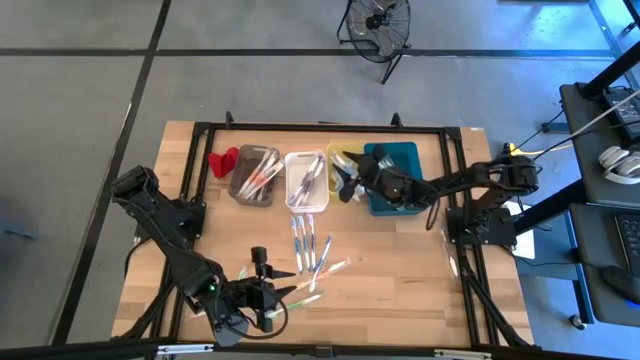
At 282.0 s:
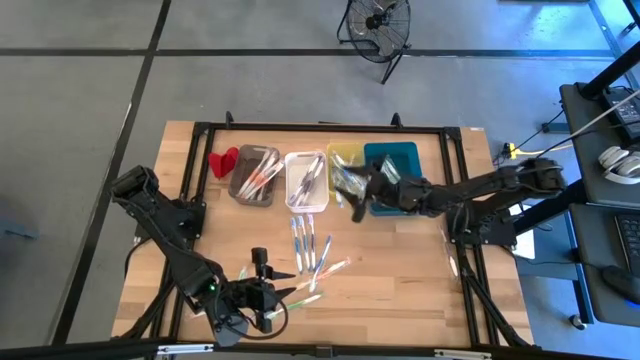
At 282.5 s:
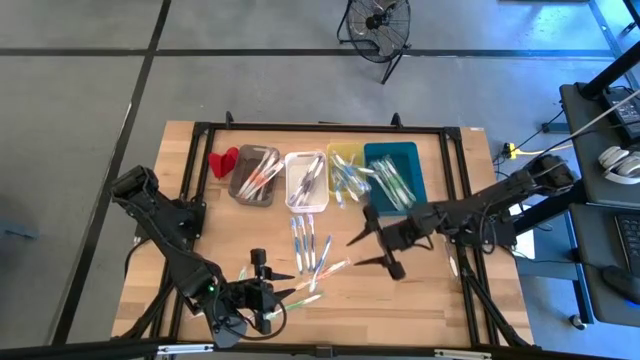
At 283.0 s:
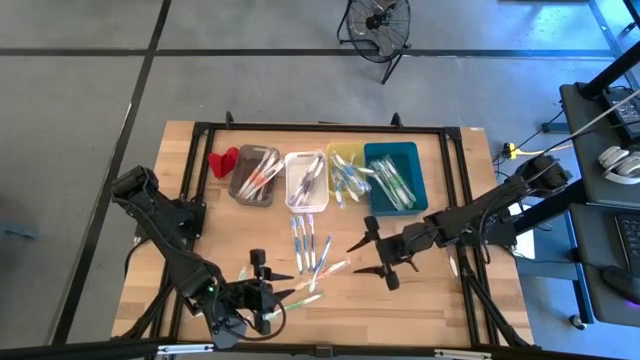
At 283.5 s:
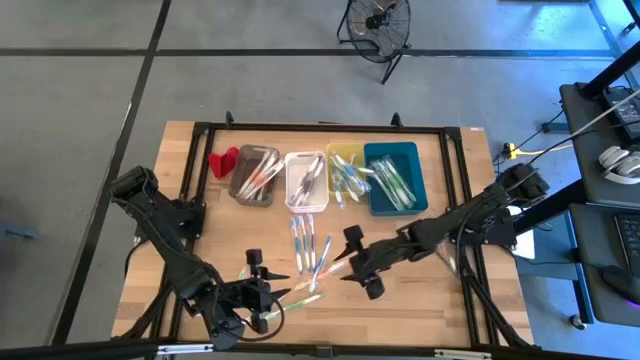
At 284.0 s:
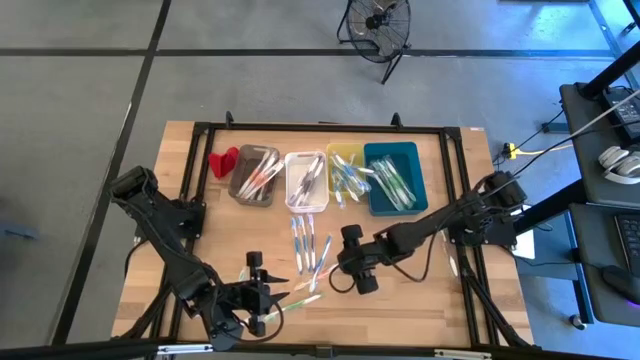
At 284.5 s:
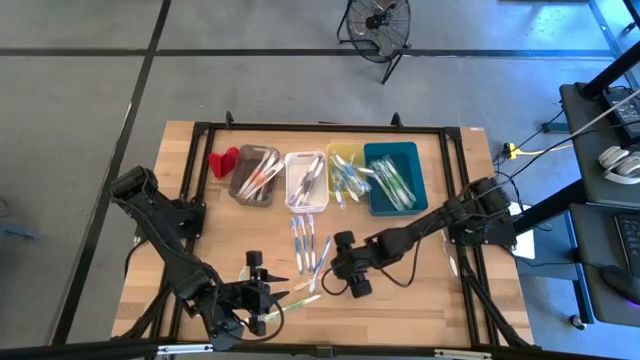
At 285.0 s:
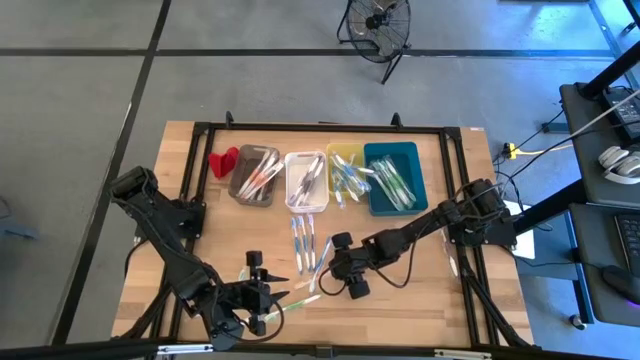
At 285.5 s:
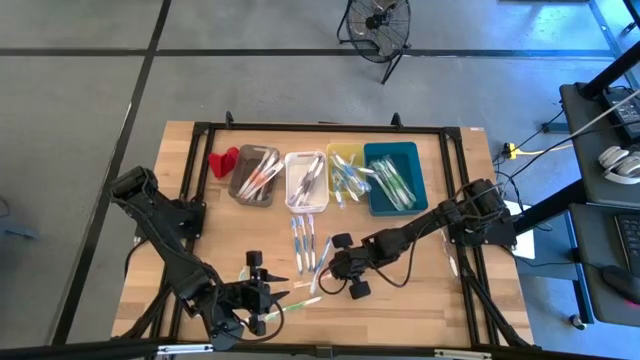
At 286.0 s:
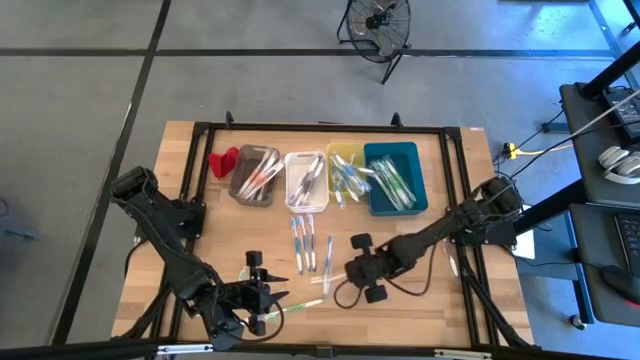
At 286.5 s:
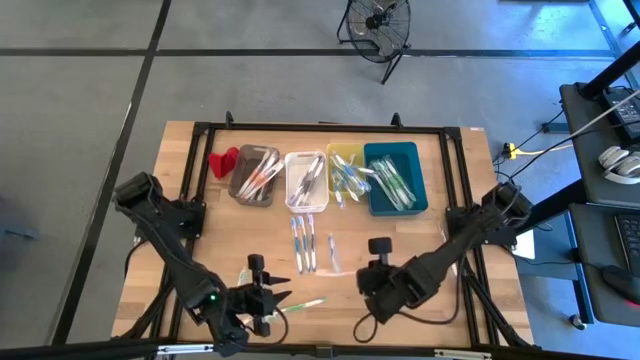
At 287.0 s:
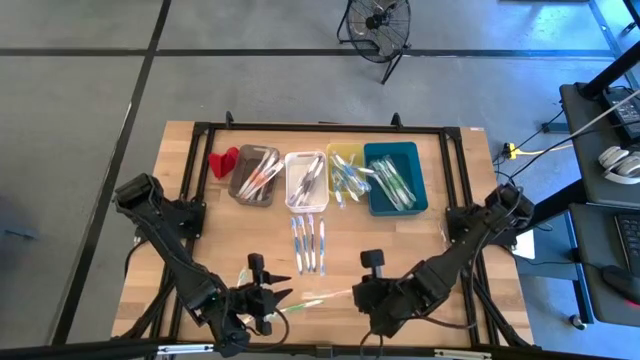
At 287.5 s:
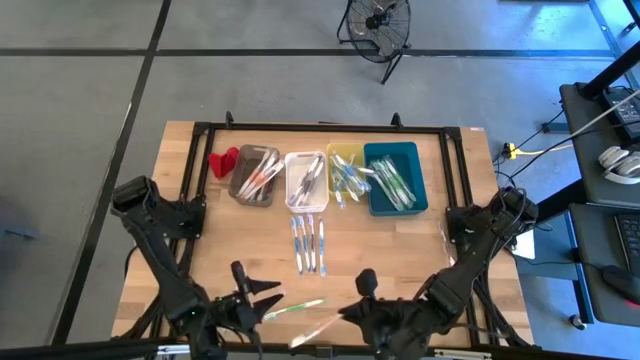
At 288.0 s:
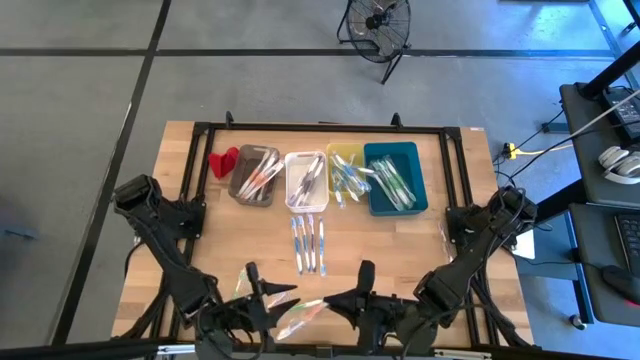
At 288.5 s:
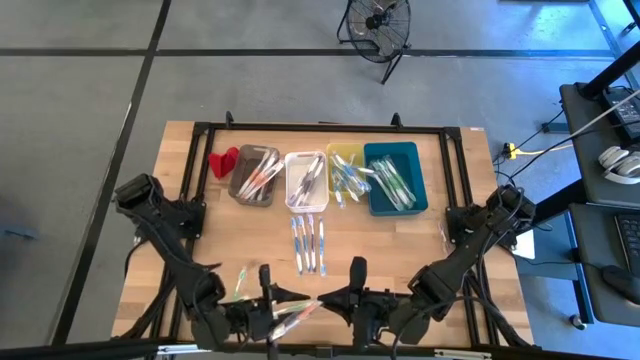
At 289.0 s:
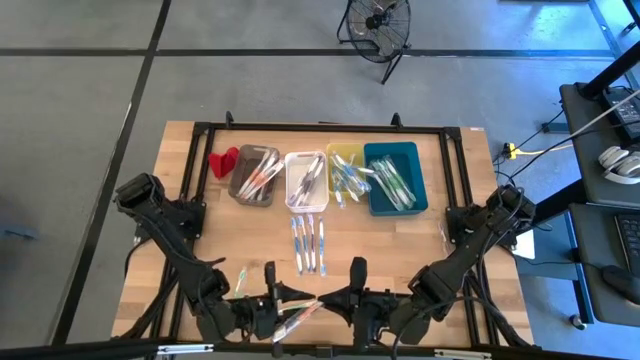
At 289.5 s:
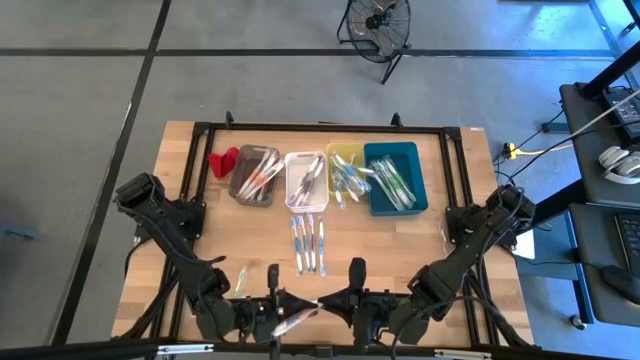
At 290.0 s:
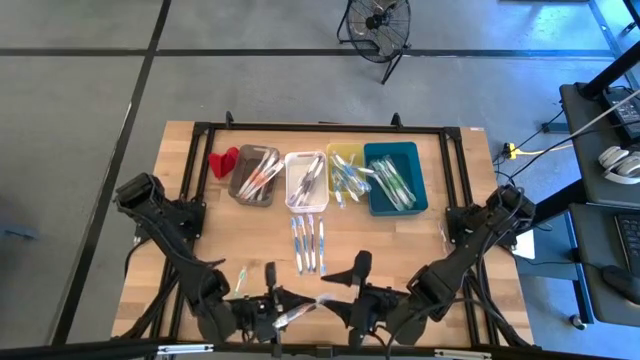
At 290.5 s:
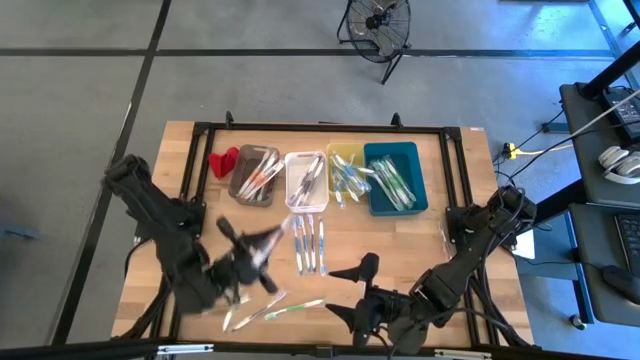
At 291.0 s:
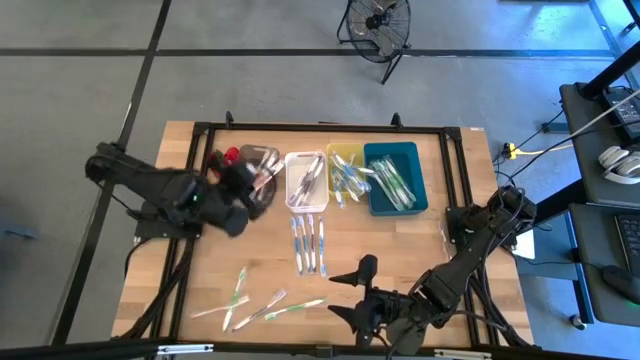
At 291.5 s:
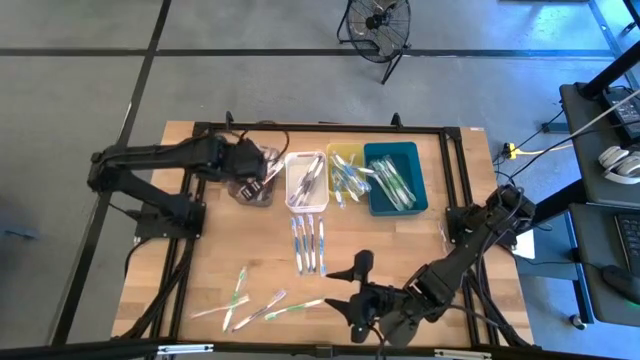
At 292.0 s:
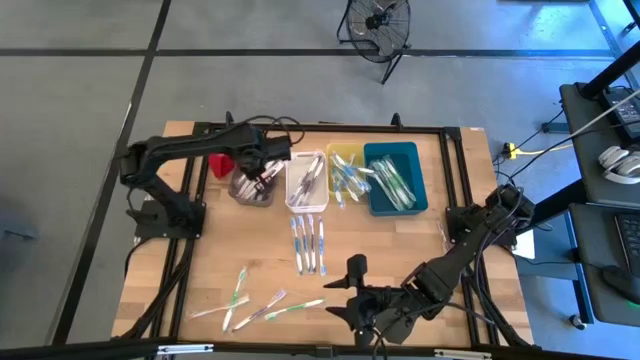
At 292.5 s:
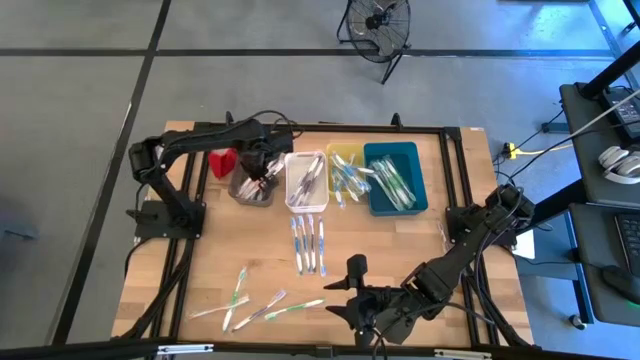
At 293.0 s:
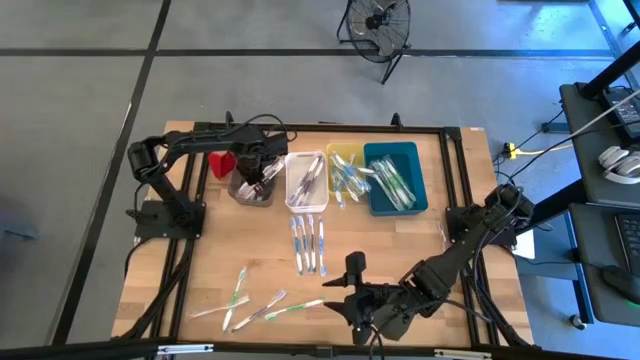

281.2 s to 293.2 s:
Task: Pick & Place Toothbrushes
Put the right orange toothbrush into the black bin

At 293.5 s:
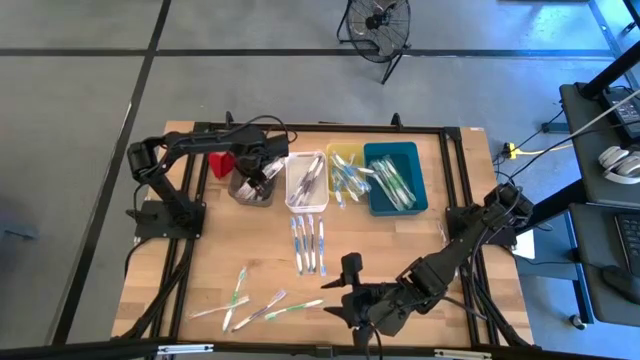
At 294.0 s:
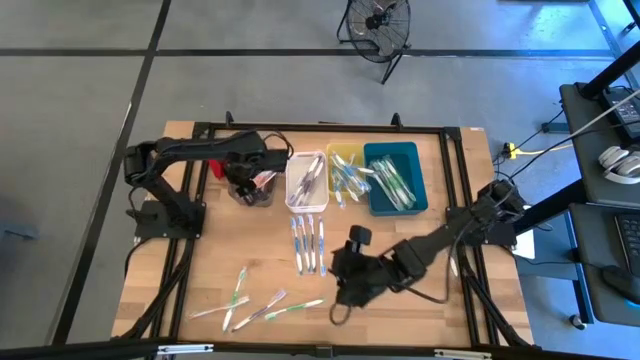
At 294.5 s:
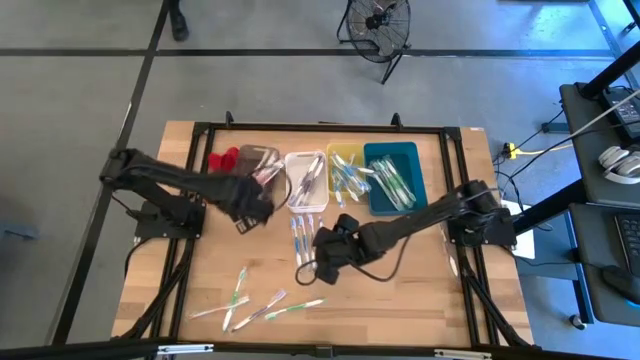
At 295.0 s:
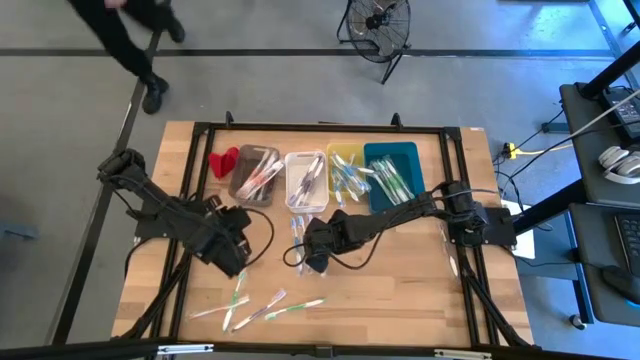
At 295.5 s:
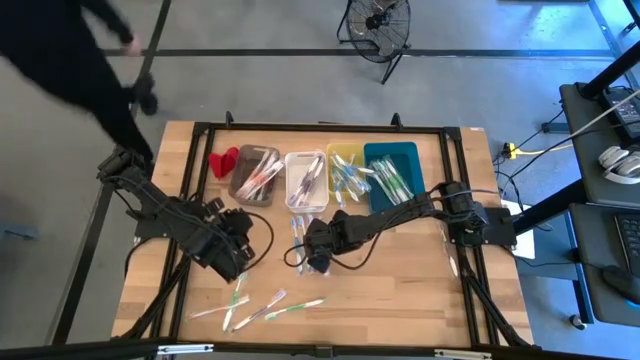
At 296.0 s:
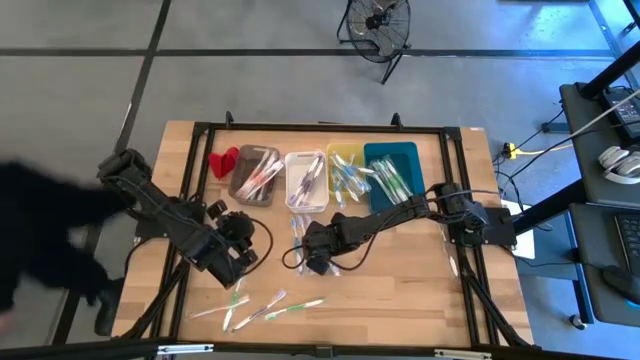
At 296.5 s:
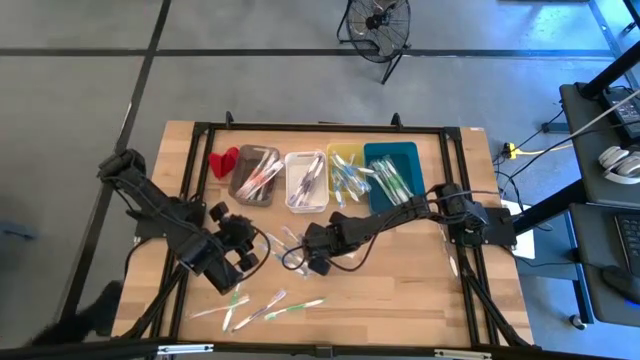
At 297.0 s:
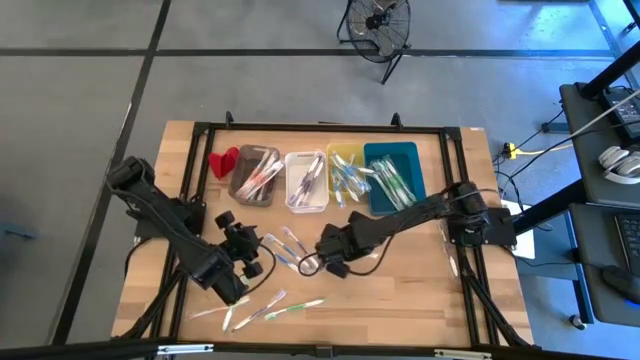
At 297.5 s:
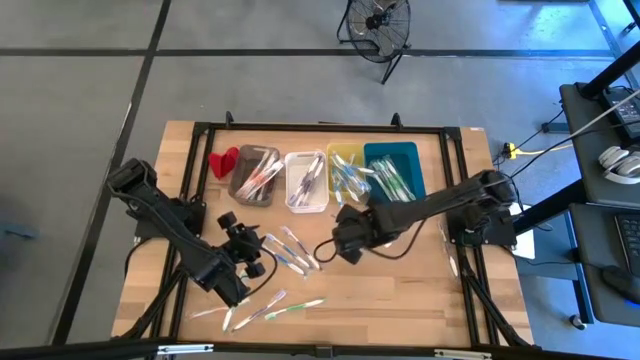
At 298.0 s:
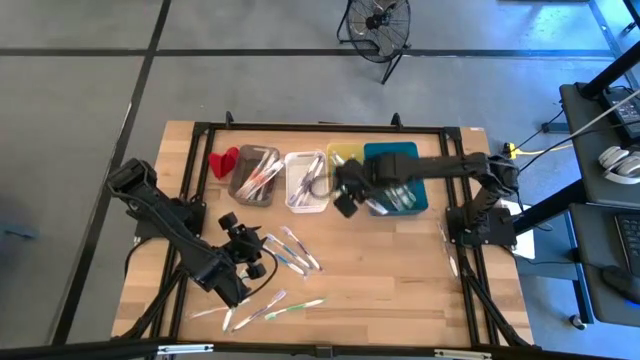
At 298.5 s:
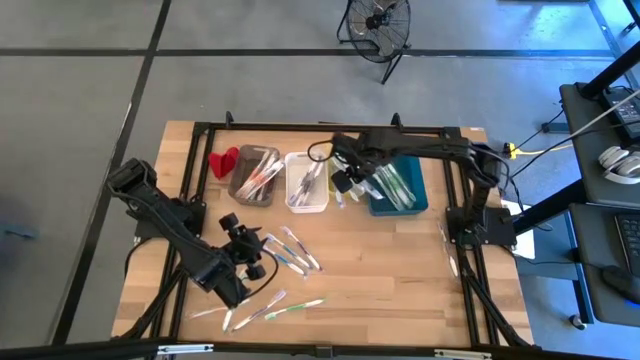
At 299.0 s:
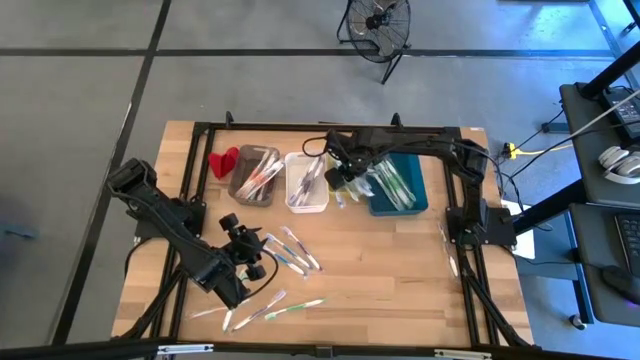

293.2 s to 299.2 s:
Put the right blue toothbrush into the yellow bin

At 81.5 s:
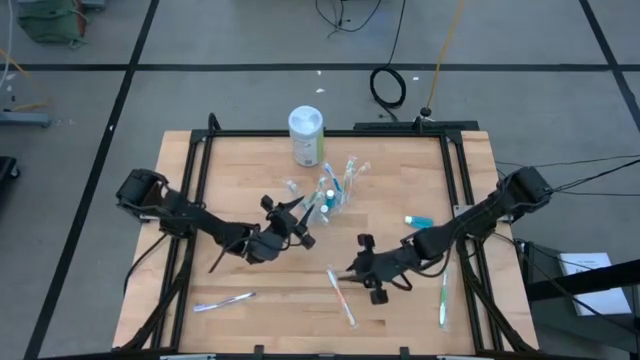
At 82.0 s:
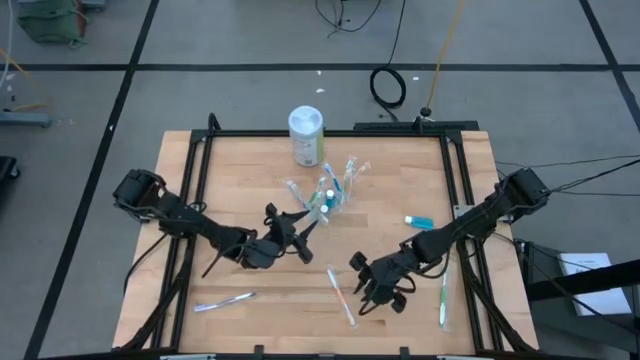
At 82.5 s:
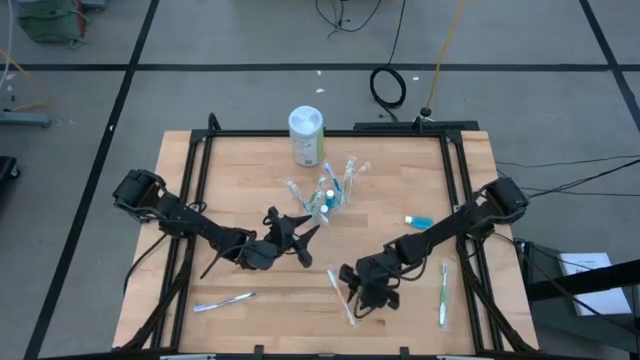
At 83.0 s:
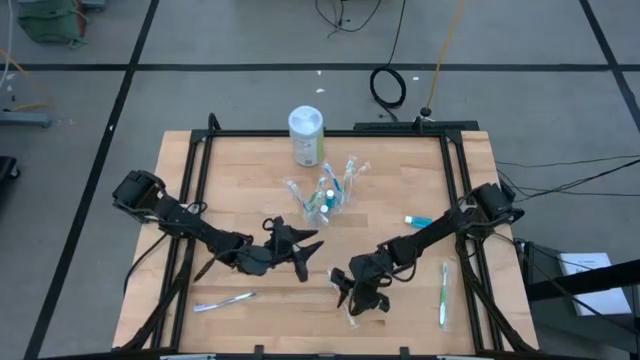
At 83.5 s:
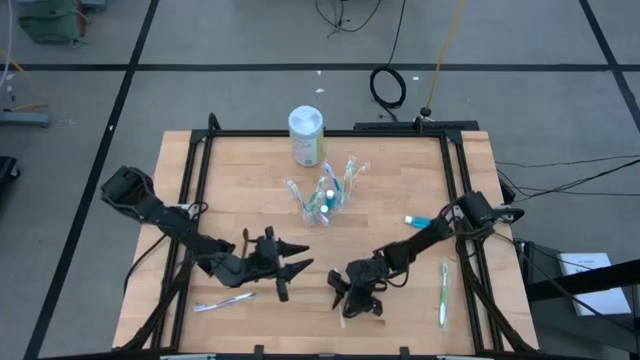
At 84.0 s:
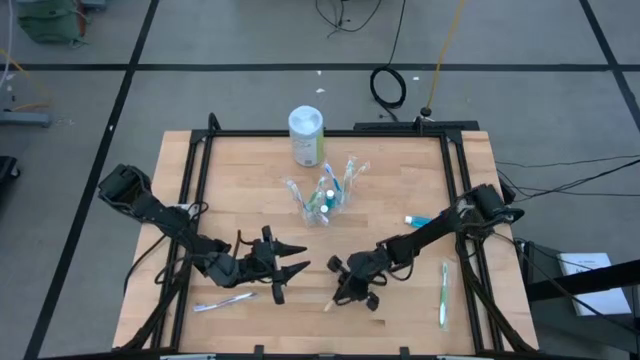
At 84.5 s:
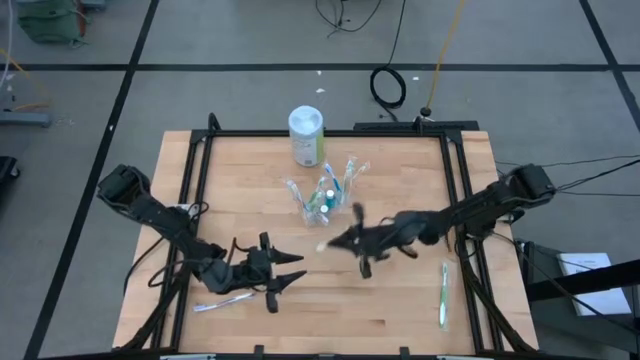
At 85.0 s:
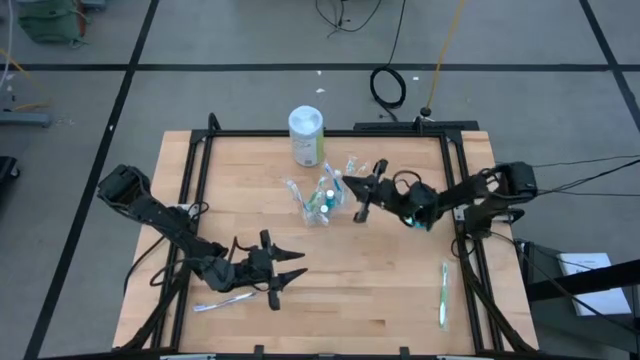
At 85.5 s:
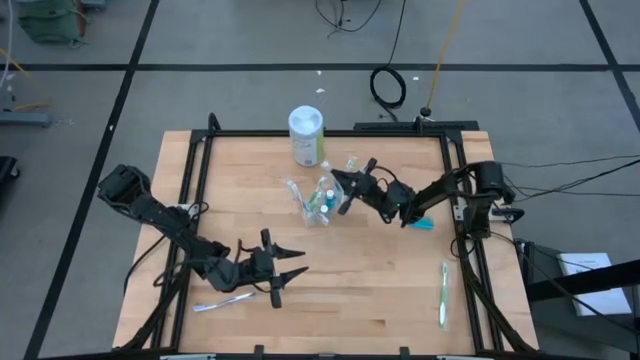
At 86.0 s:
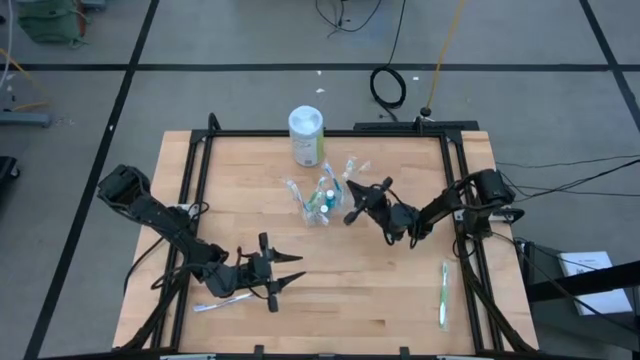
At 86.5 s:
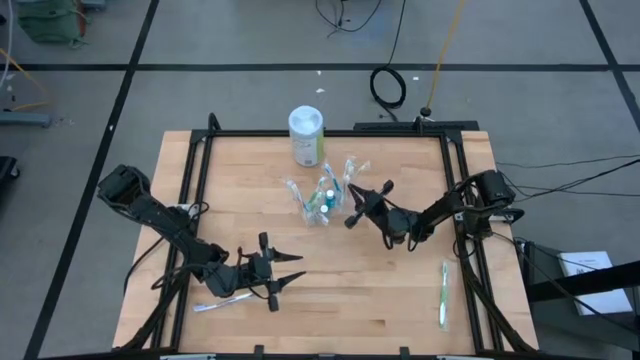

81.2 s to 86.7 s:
Task: Pick & Place toothbrushing station
Put the orange toothbrush into the transparent organizer
